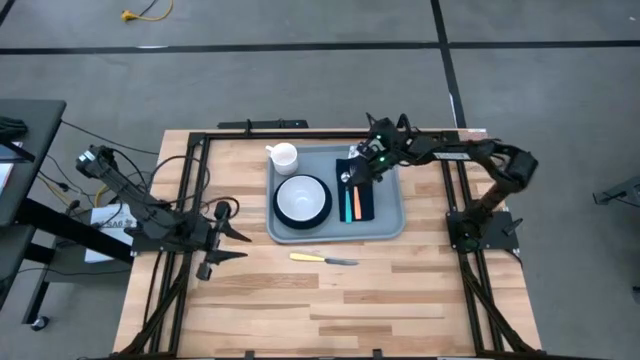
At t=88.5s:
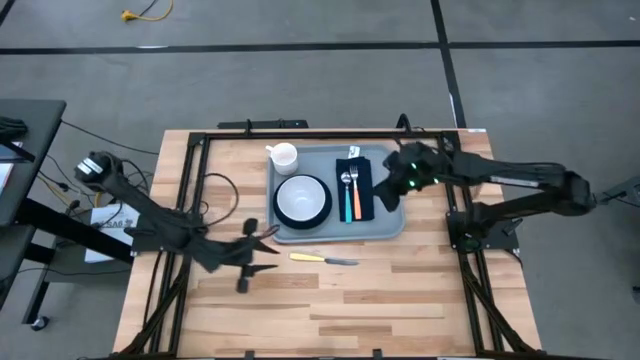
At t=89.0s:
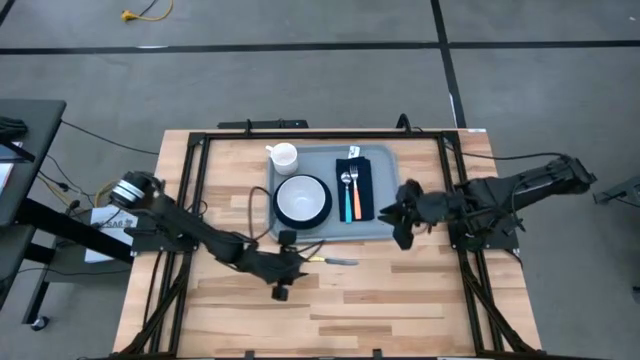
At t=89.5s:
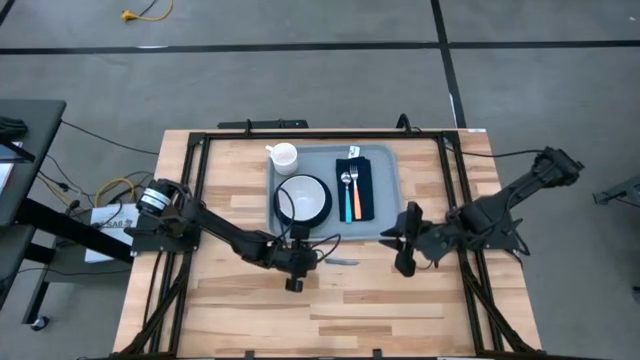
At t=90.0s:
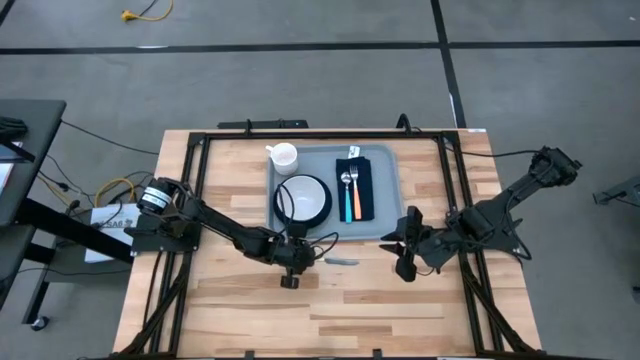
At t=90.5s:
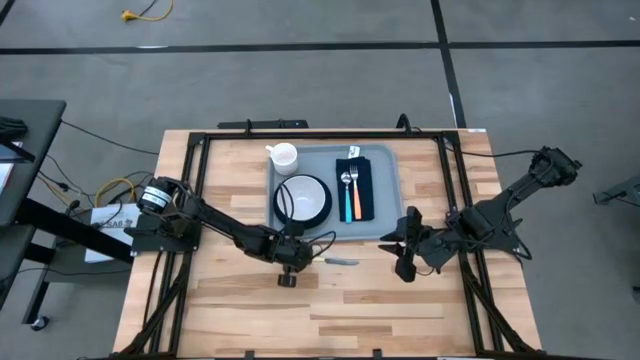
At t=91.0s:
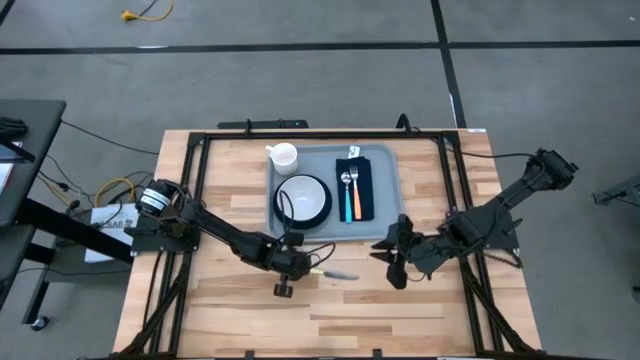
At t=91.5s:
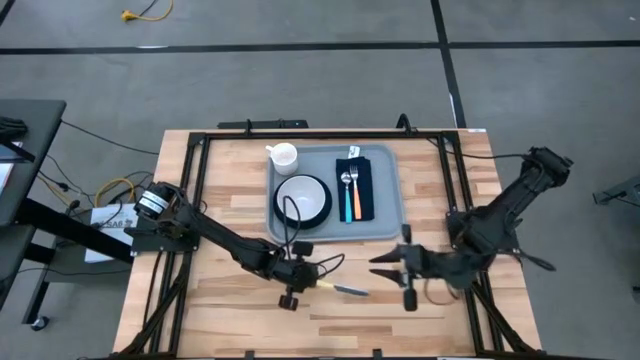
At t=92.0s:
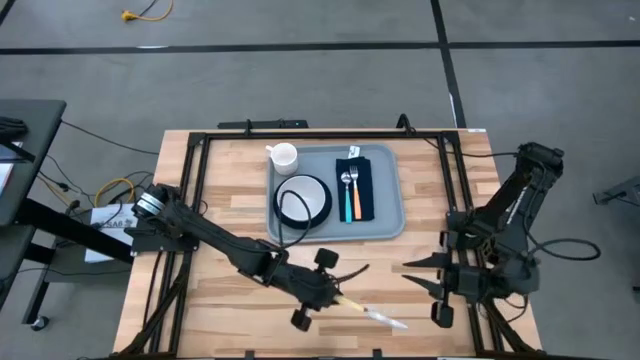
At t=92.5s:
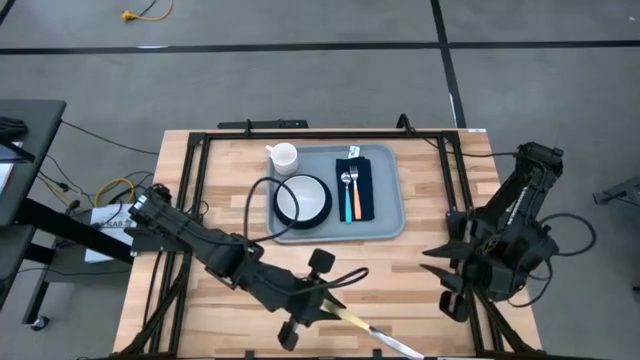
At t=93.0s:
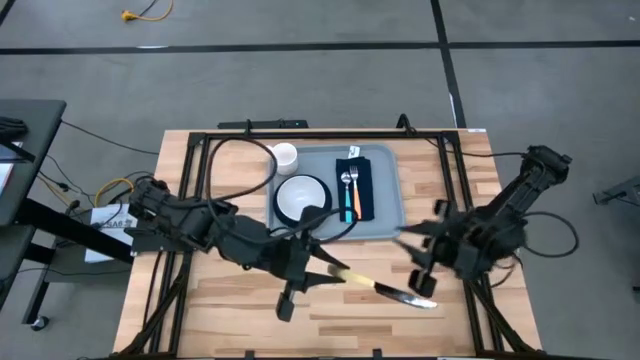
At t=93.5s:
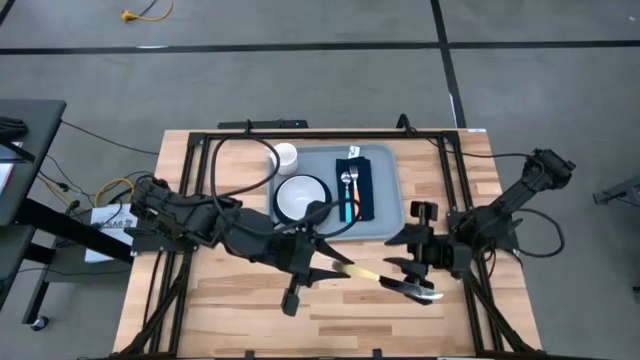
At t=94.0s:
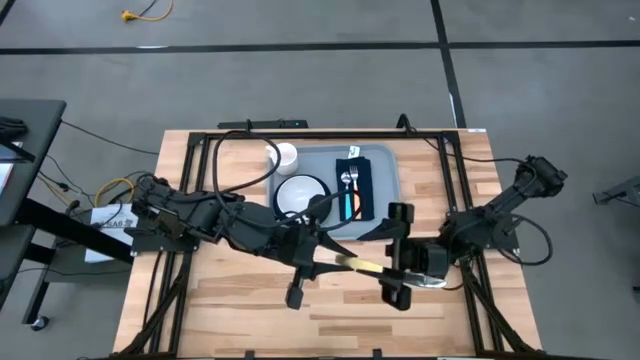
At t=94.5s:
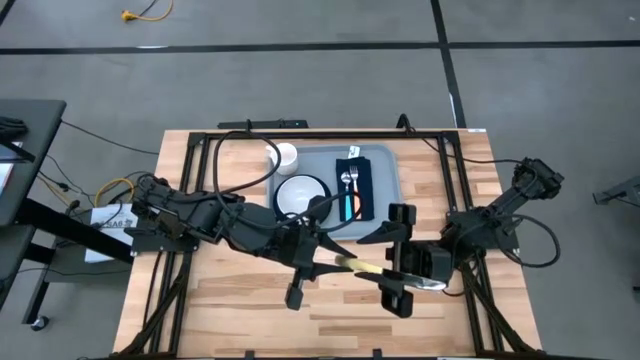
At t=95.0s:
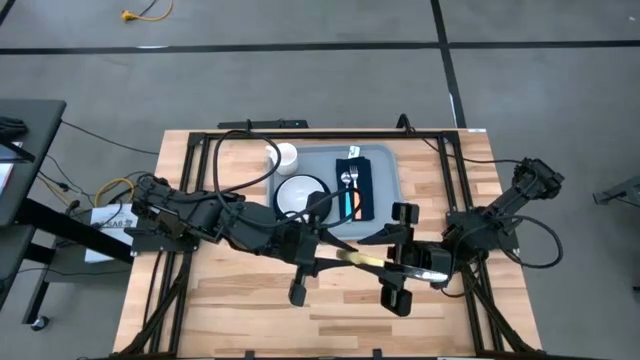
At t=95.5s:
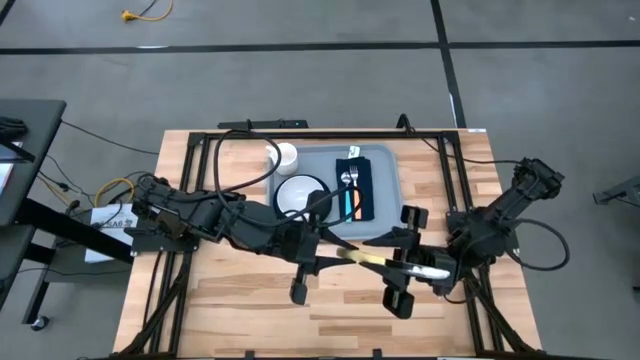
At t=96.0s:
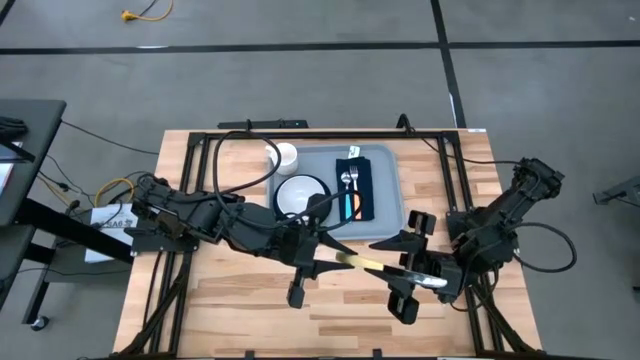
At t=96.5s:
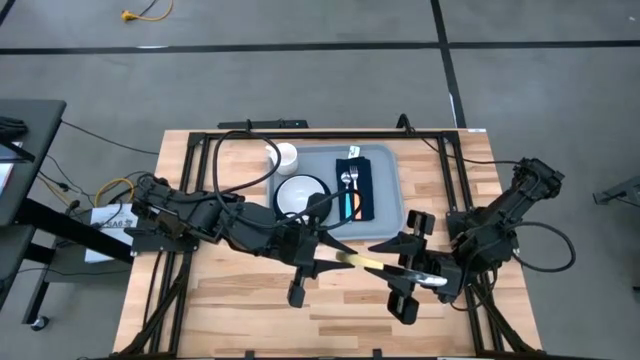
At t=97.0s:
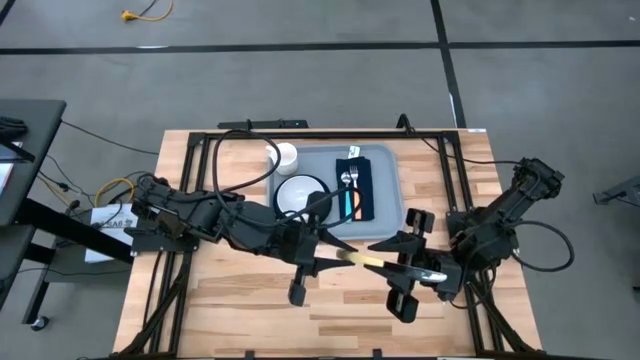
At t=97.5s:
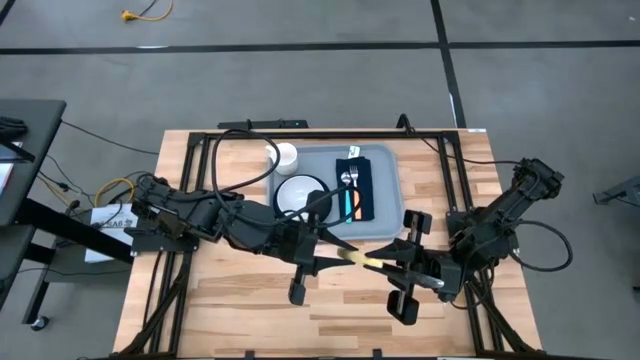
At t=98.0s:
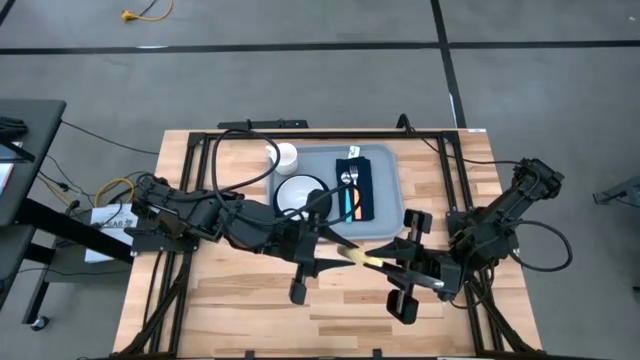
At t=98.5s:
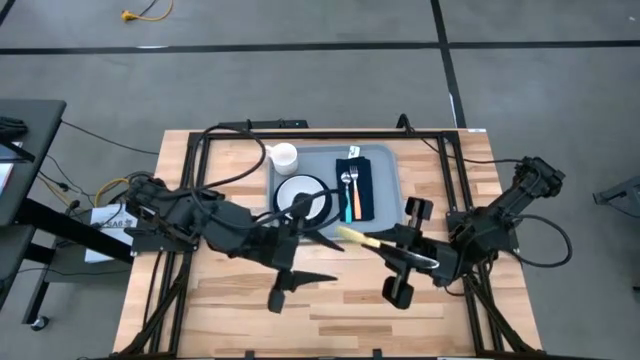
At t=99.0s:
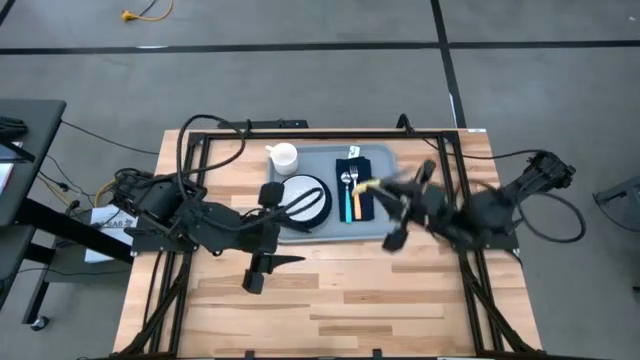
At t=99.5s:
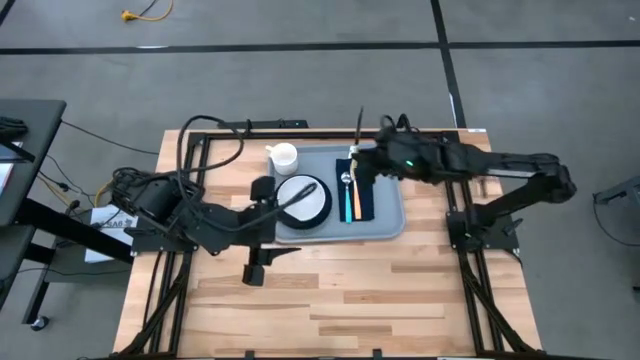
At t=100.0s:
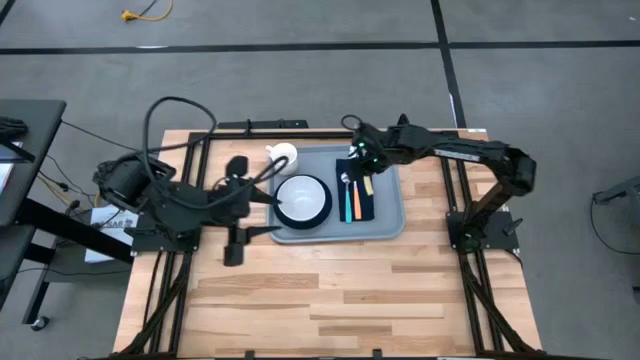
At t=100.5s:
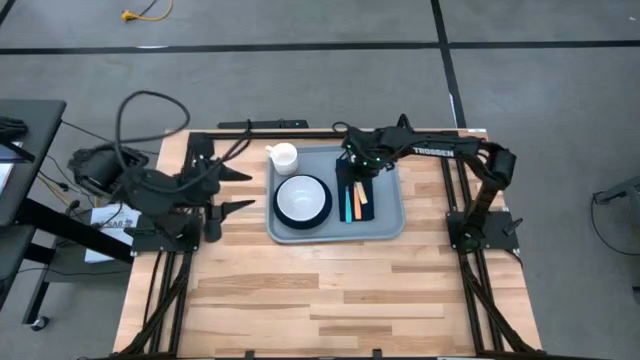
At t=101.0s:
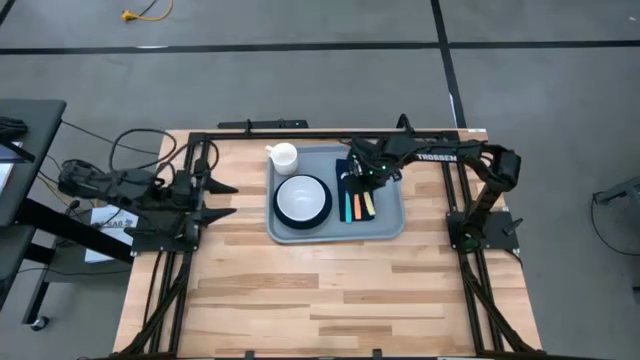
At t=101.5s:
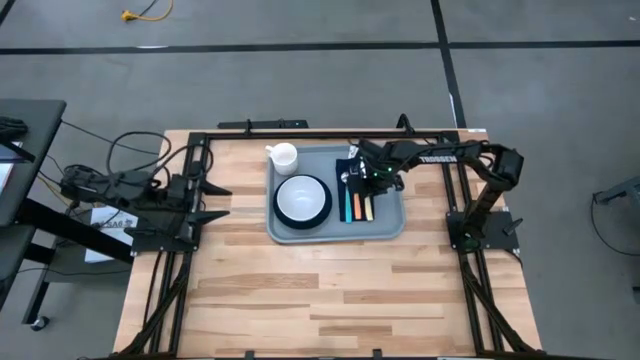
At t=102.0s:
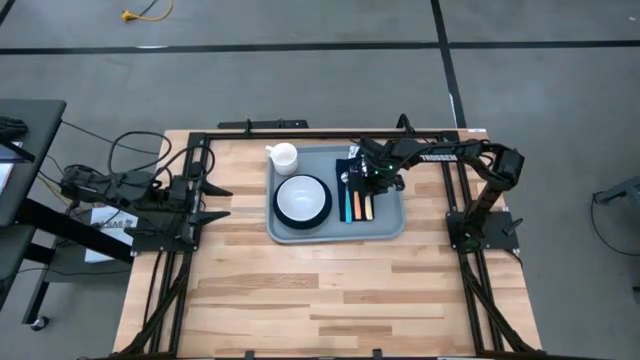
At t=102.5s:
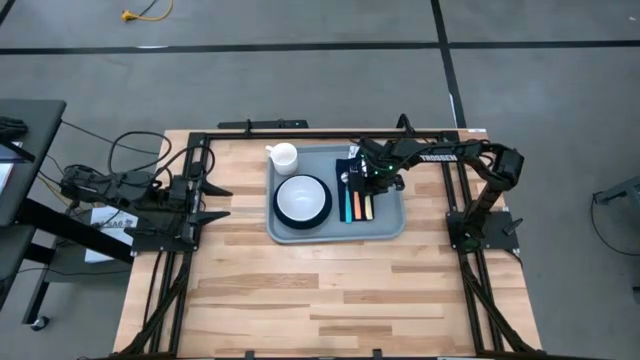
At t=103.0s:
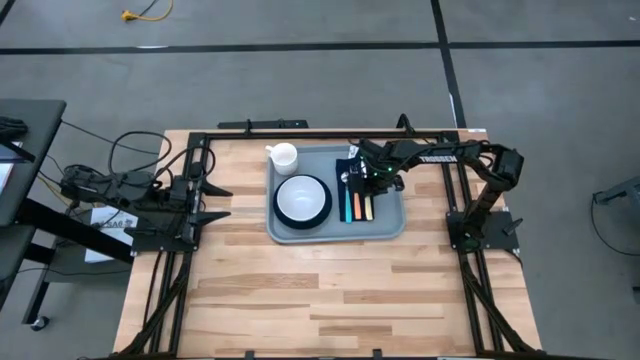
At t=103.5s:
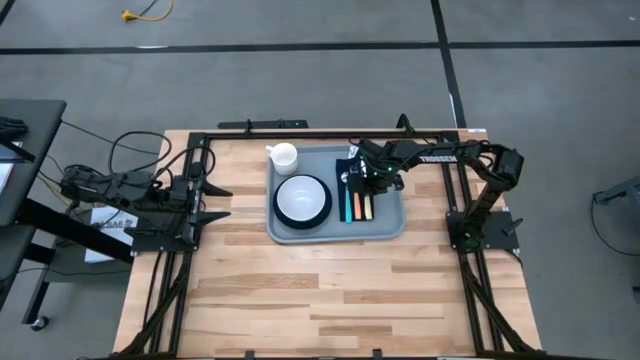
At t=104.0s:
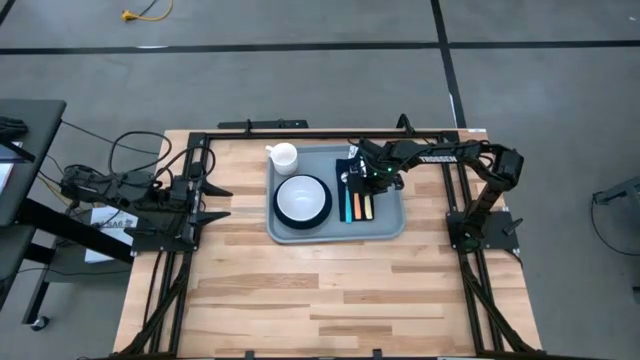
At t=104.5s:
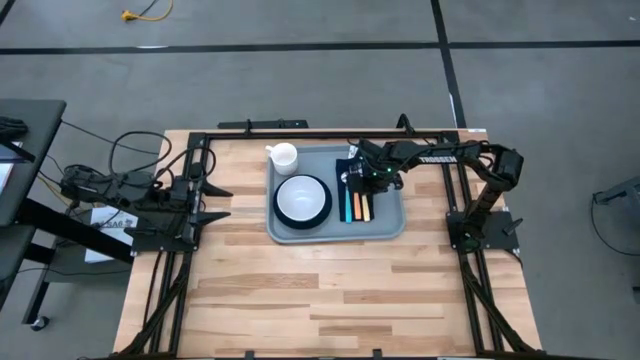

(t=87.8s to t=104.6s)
Task: Set up tray
Put the yellow knife on top of the black napkin on the gray tray

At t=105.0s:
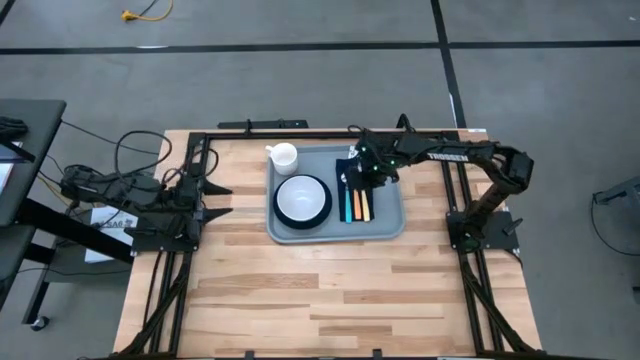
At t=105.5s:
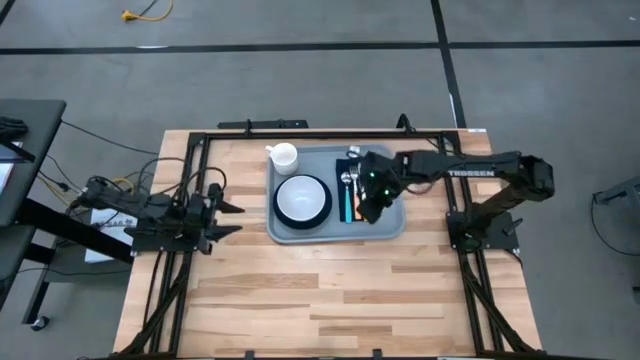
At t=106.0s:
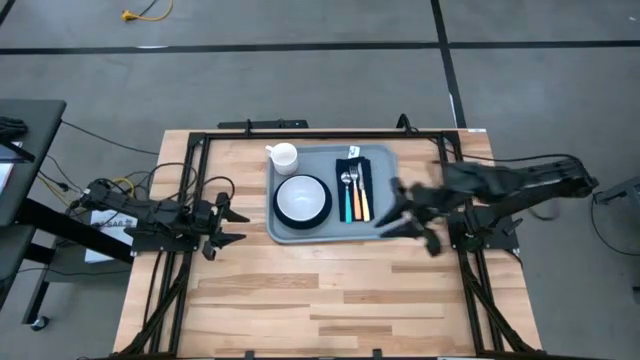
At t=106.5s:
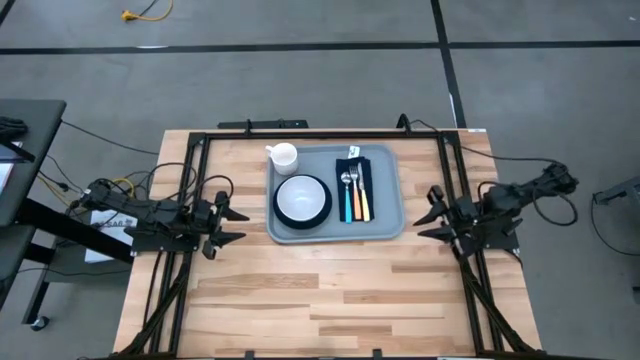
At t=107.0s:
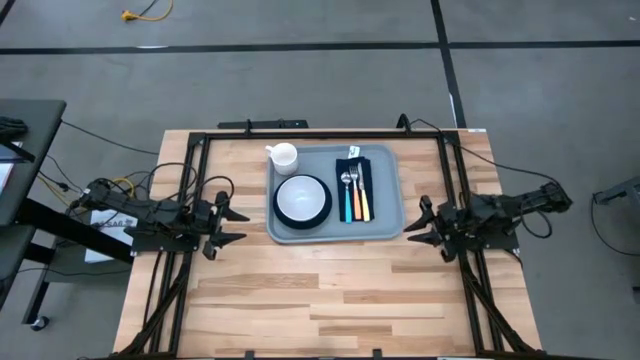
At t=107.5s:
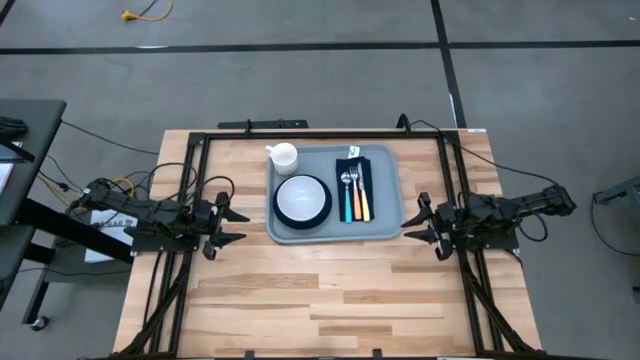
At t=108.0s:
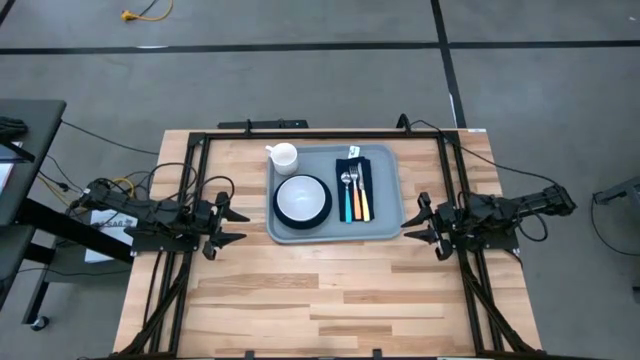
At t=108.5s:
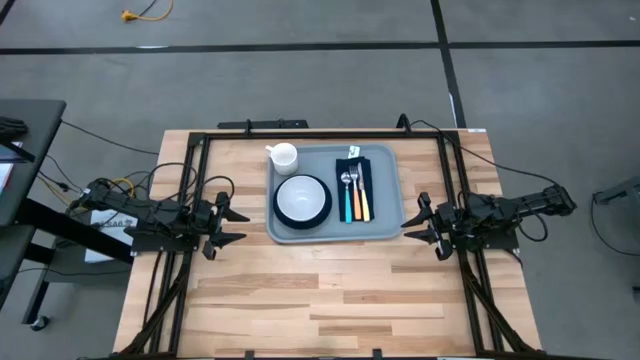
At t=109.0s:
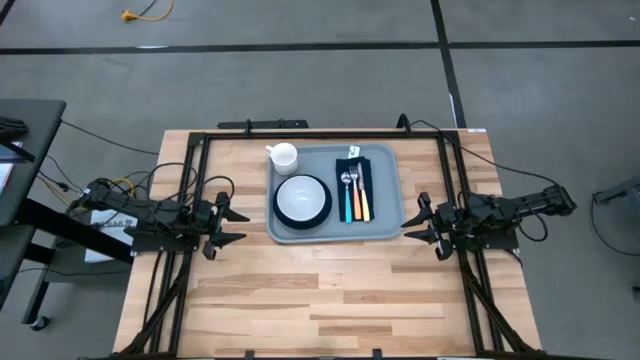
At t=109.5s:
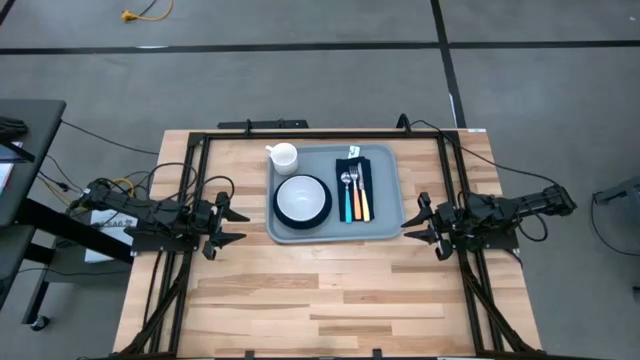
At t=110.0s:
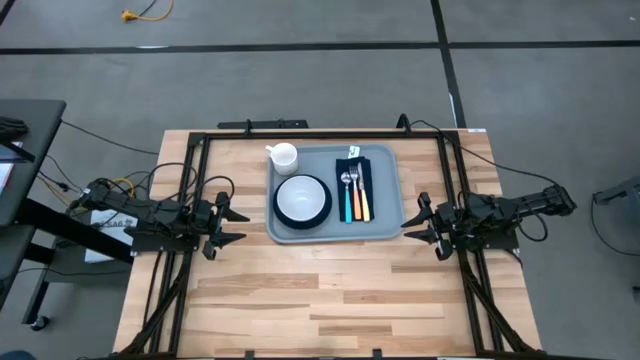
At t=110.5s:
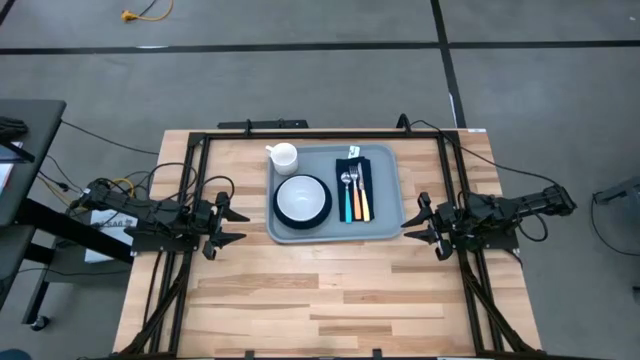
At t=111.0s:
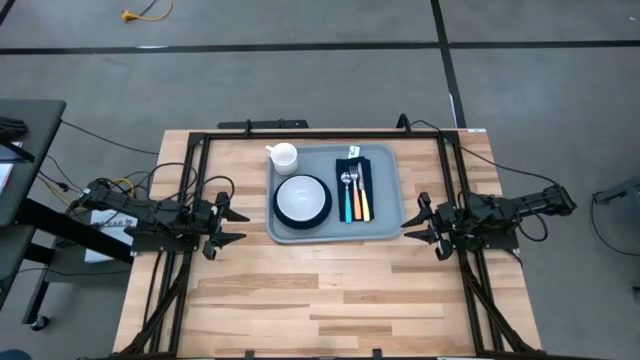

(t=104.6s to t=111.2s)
Return to Home Position
